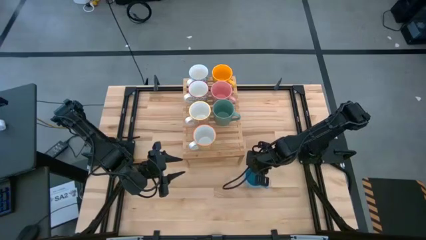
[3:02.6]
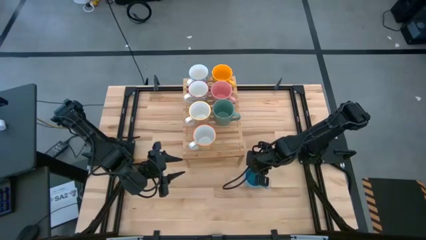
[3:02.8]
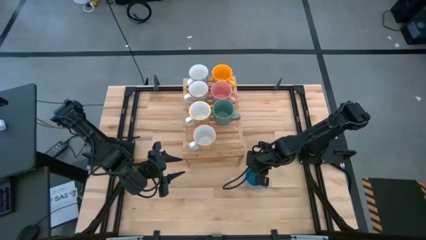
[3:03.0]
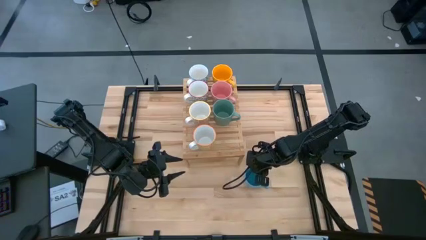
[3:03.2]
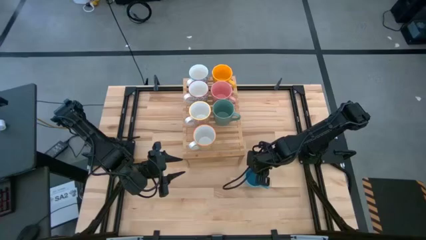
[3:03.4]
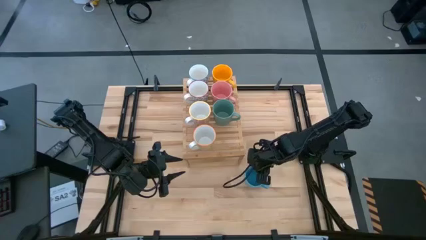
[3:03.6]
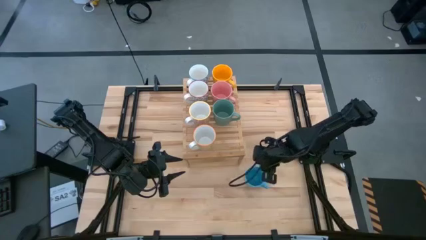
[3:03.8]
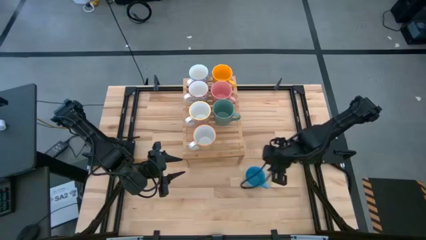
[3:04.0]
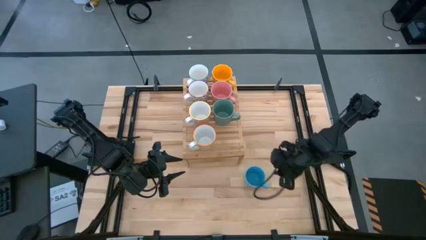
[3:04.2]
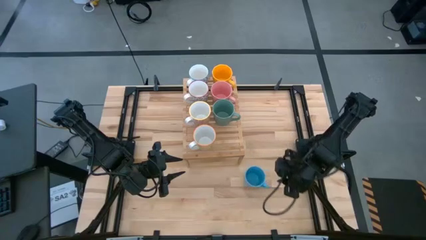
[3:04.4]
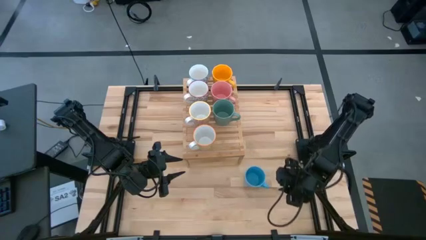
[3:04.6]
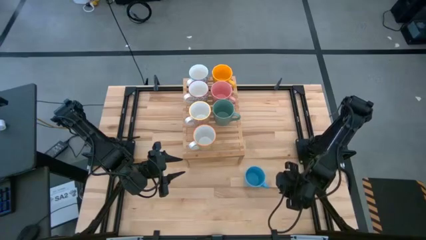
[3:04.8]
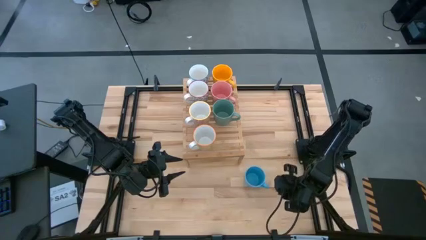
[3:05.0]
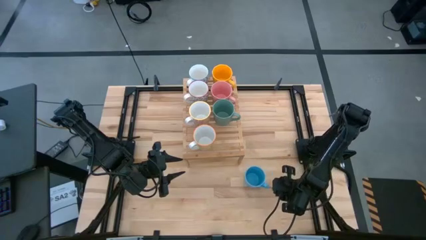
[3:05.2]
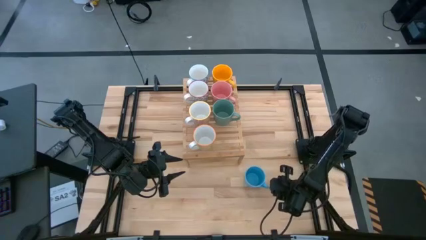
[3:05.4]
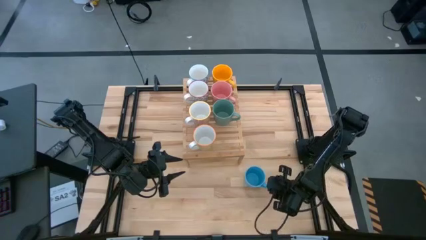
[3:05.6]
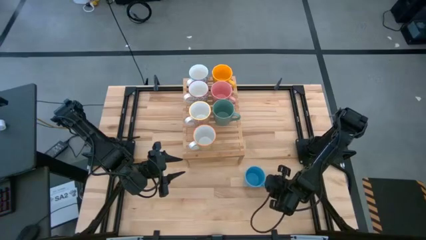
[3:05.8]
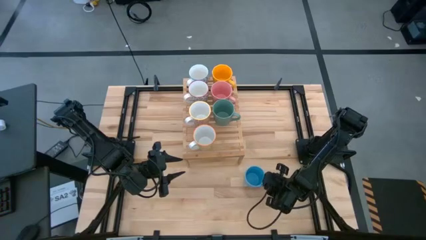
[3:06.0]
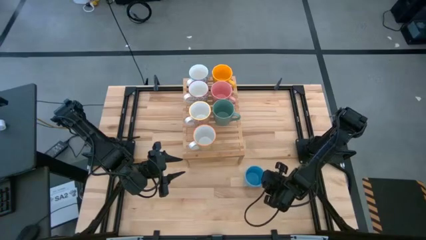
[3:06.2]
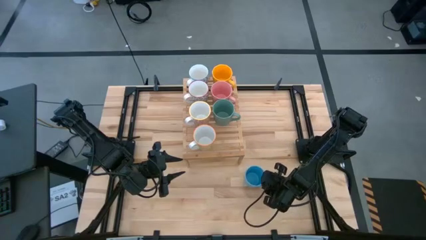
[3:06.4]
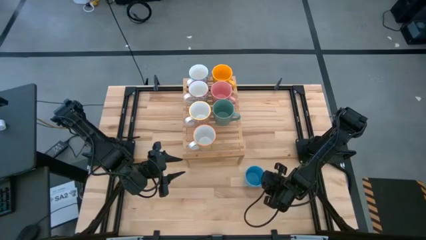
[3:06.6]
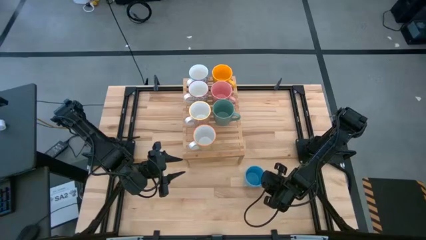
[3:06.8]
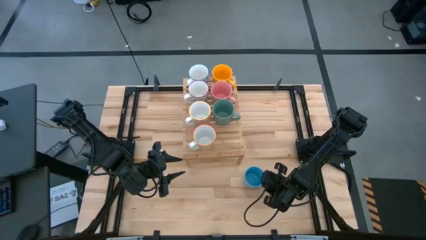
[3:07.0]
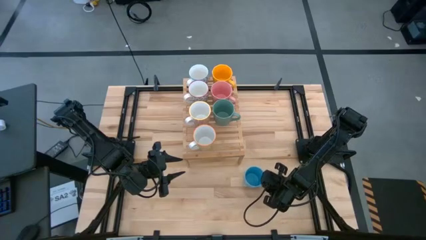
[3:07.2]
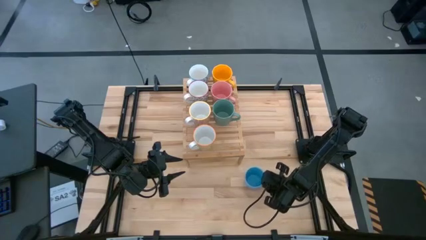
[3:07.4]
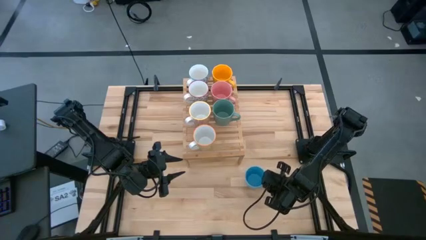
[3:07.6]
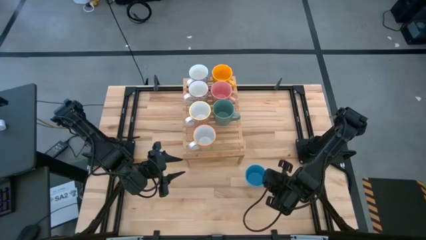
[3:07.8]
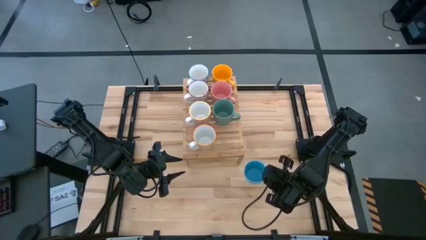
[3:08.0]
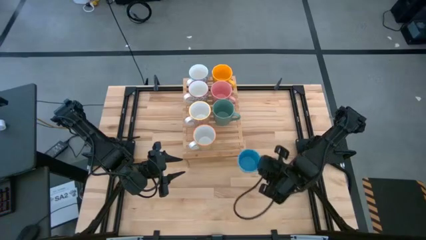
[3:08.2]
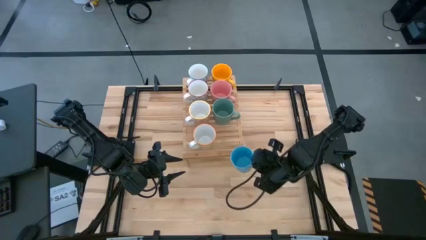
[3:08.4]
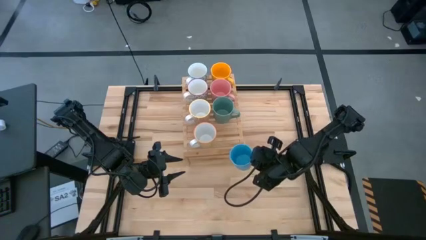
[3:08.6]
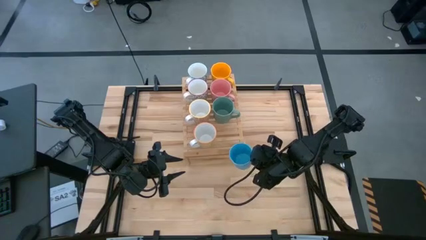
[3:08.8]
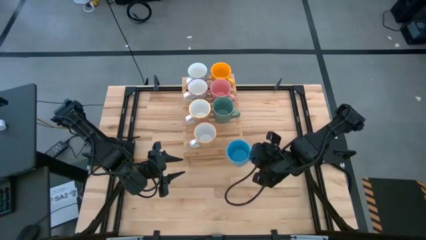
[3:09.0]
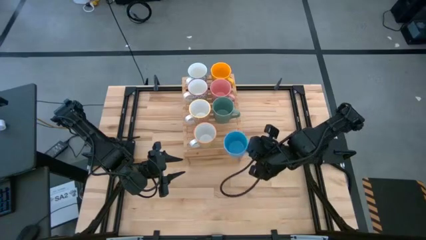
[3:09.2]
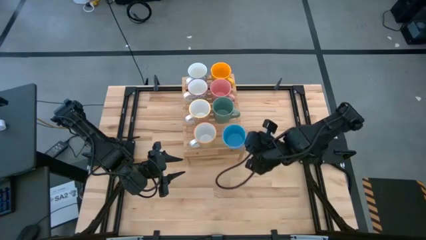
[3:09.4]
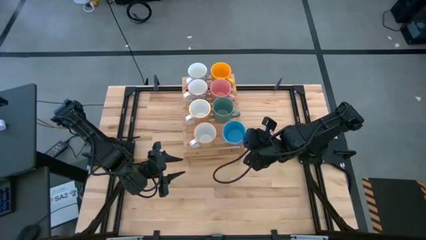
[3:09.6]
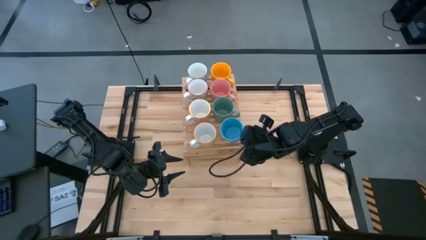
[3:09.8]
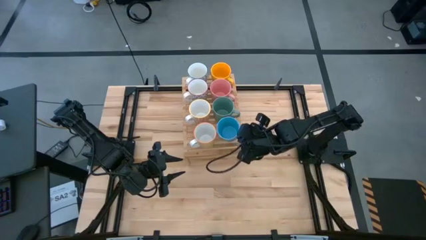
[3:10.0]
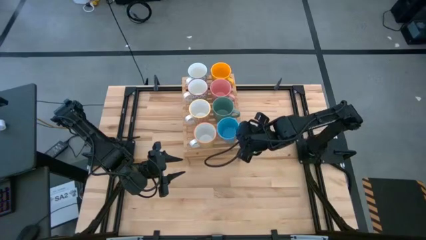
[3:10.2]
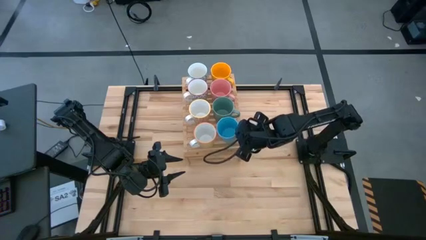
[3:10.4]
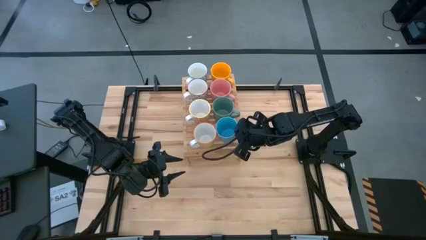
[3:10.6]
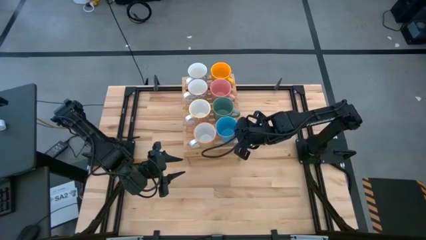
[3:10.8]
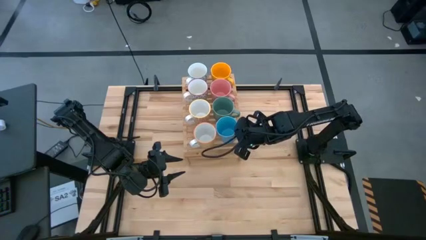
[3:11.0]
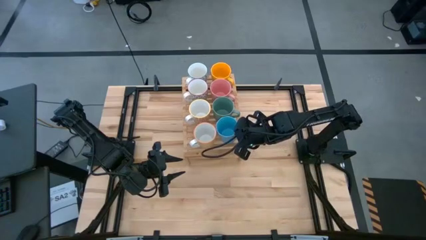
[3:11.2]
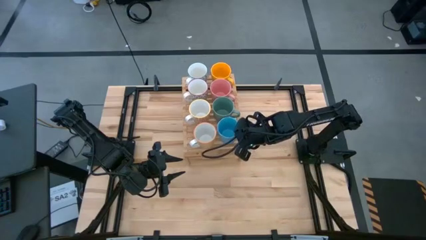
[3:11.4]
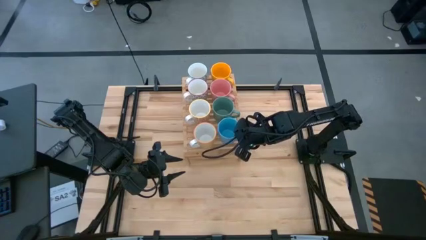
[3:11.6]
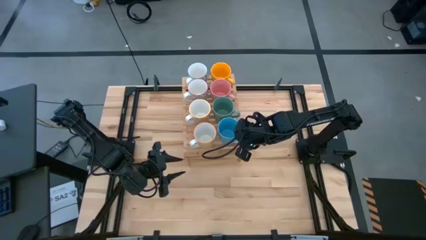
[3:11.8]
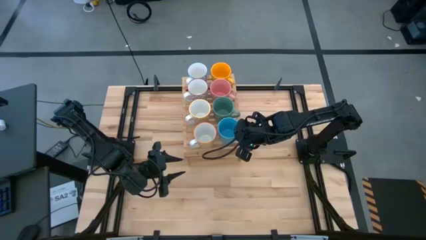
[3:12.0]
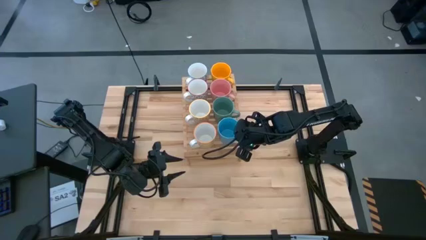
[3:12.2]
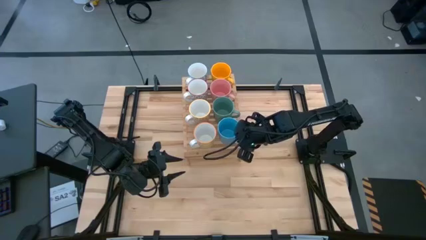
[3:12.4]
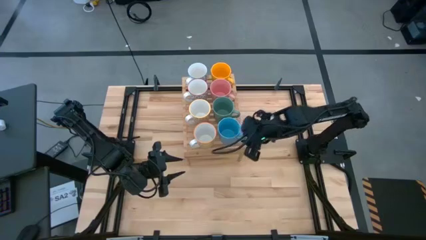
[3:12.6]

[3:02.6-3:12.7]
Task: Place coffee mugs
Put the blue cup on the shelf aligned with the other green cup

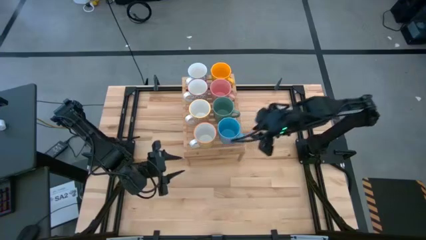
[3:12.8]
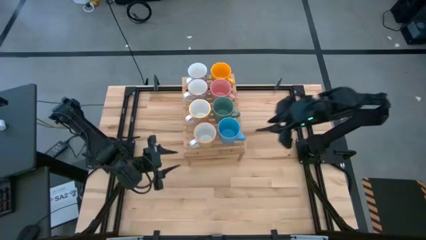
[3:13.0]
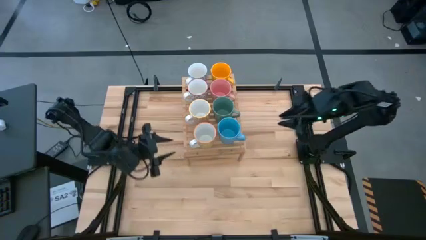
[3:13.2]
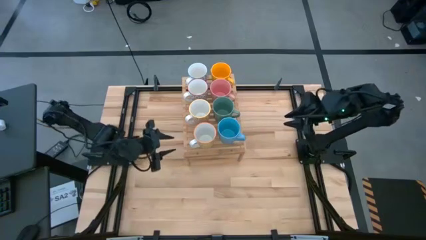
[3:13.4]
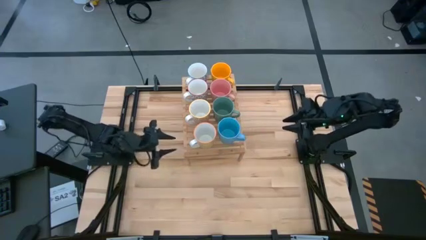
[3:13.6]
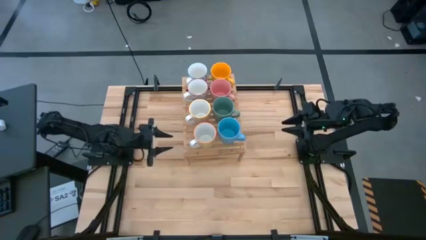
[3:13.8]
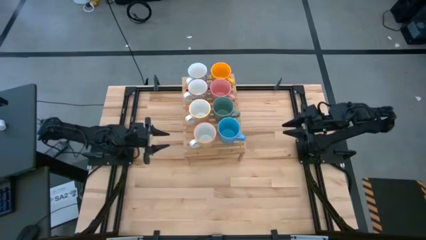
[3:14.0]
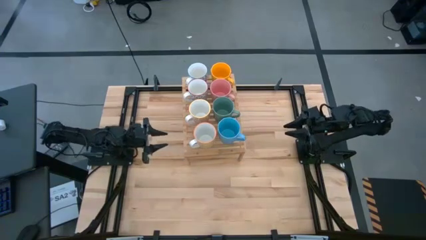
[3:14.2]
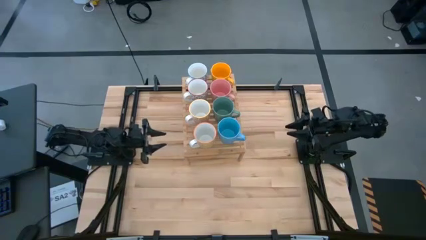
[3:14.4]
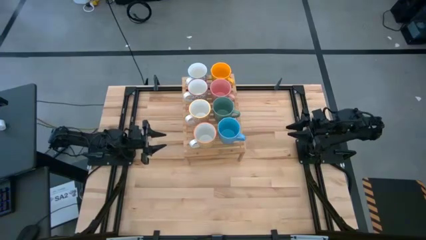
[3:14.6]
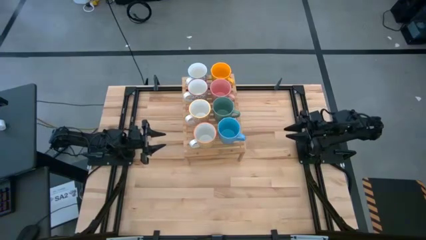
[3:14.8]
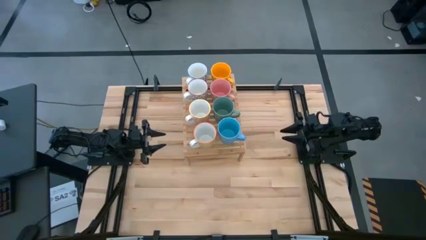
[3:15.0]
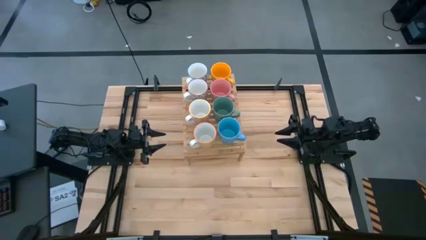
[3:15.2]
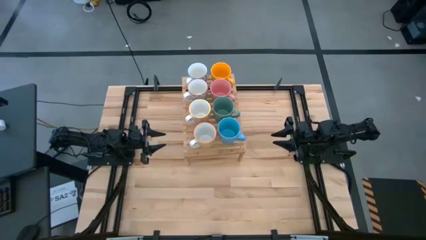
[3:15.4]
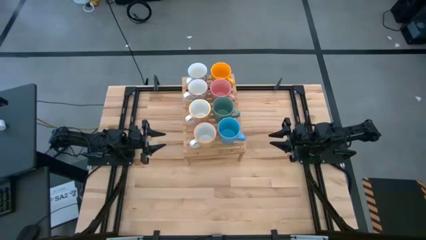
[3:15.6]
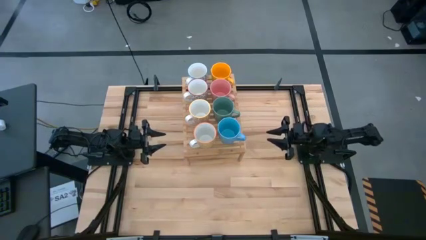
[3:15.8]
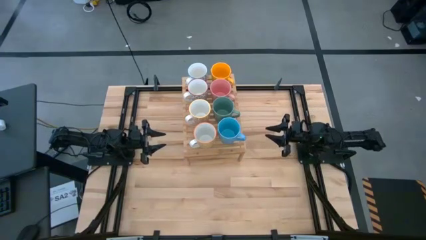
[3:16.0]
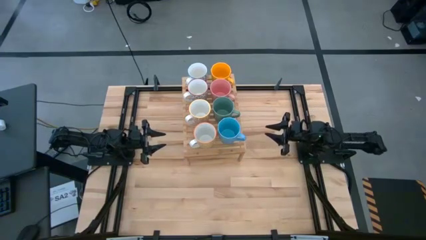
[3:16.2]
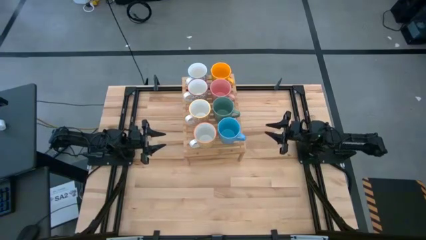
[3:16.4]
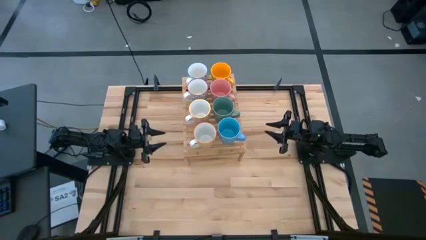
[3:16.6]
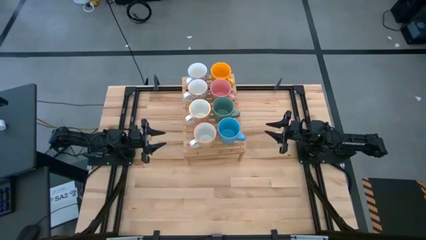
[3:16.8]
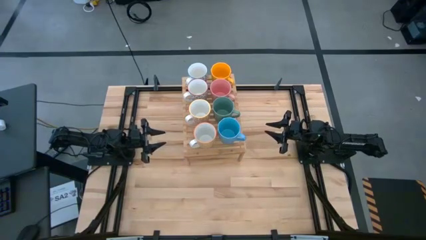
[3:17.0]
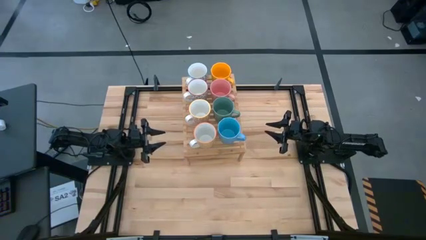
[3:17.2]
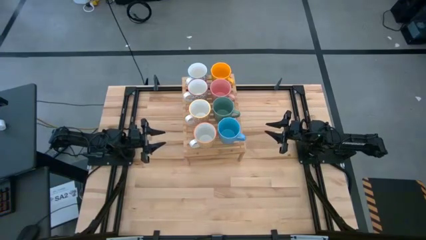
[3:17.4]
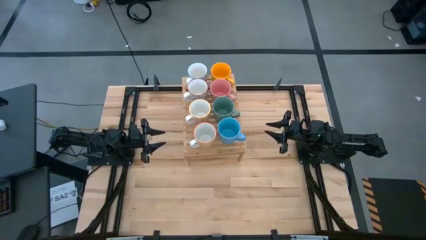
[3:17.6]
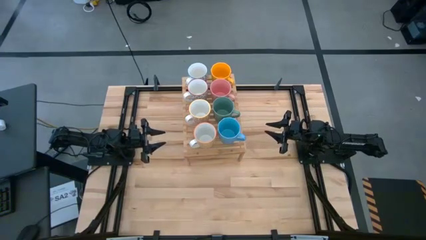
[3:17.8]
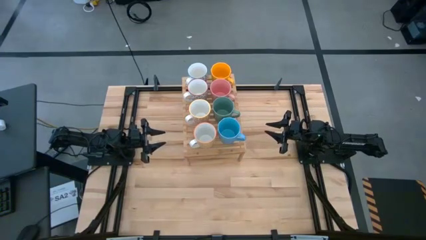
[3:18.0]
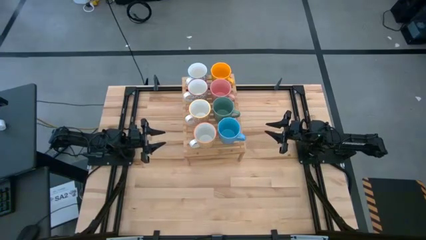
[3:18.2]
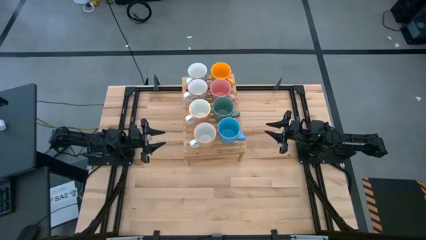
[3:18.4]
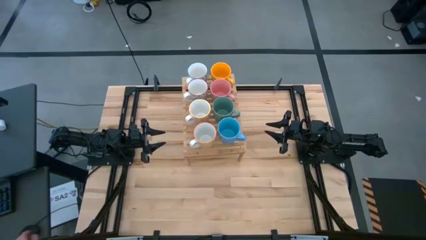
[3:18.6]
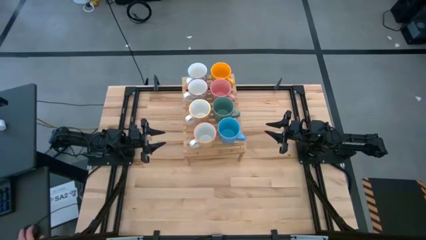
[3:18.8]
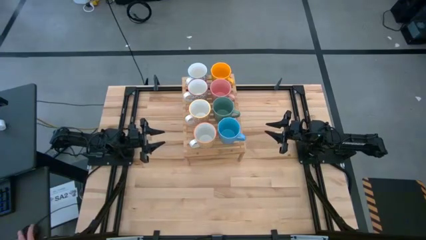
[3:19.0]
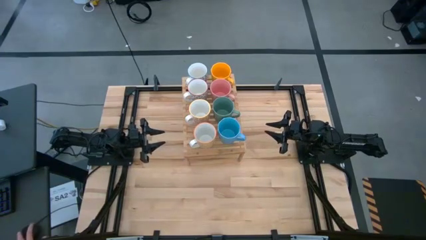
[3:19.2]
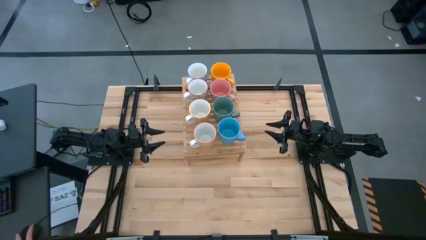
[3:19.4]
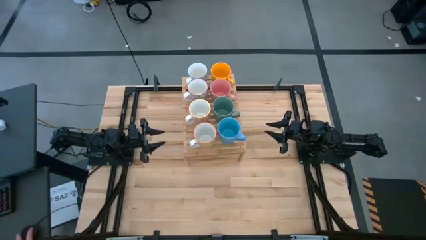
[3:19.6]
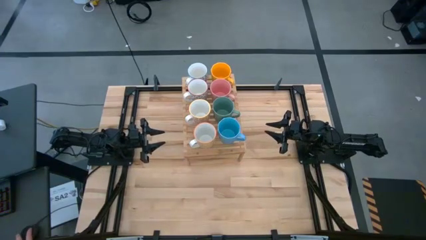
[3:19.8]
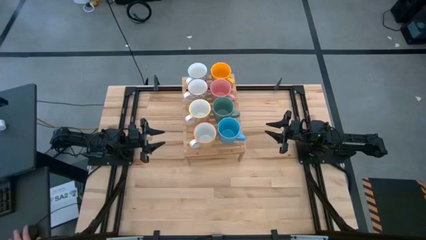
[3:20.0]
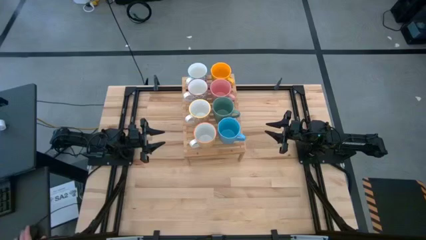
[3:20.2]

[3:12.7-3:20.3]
Return to Home Position
